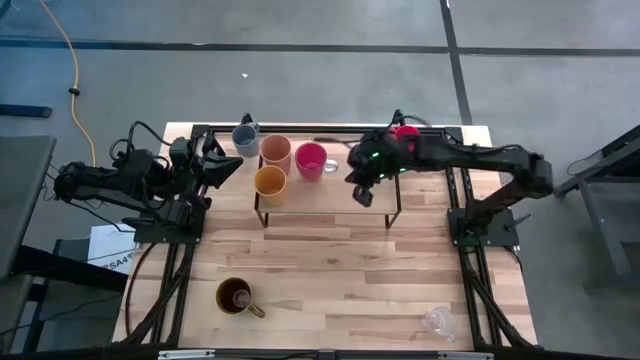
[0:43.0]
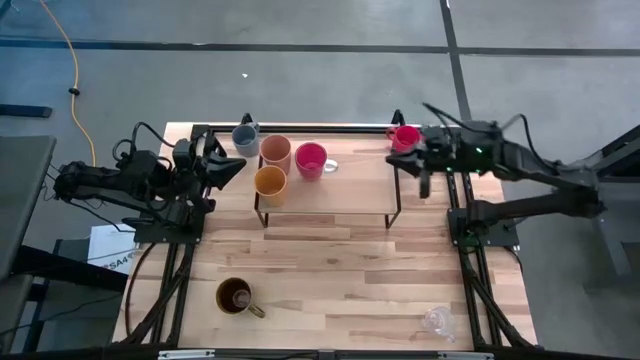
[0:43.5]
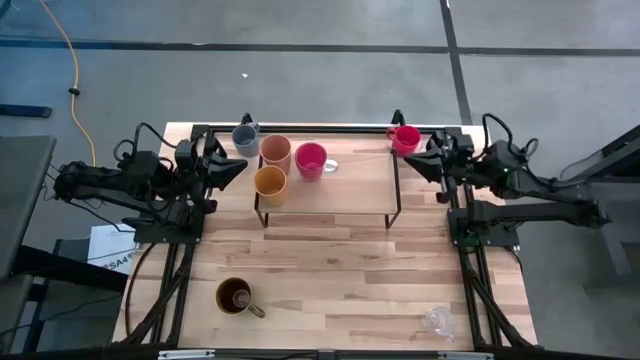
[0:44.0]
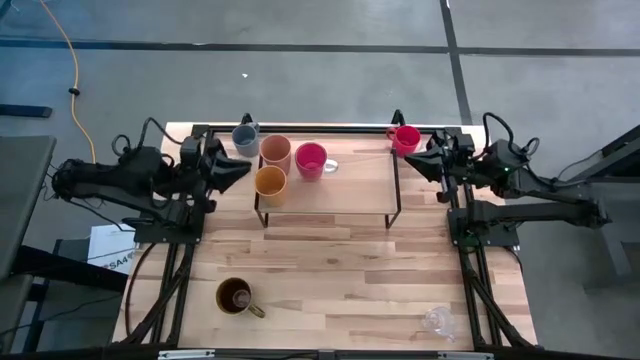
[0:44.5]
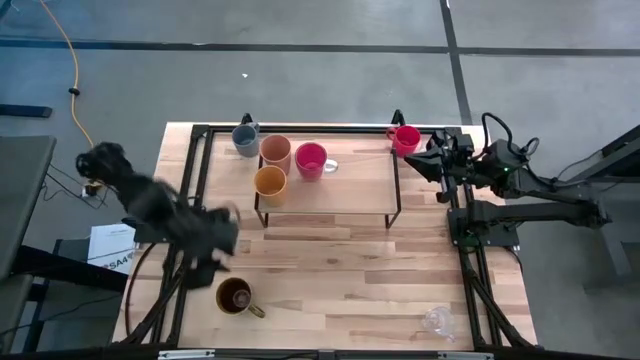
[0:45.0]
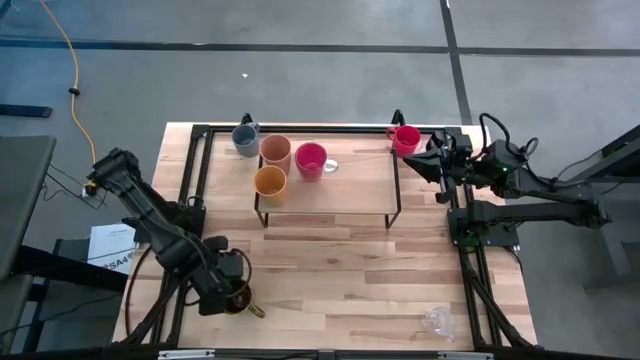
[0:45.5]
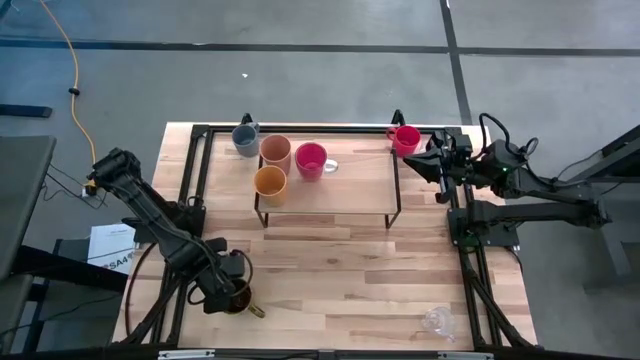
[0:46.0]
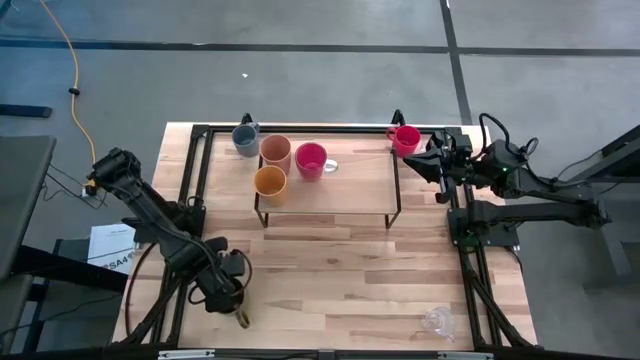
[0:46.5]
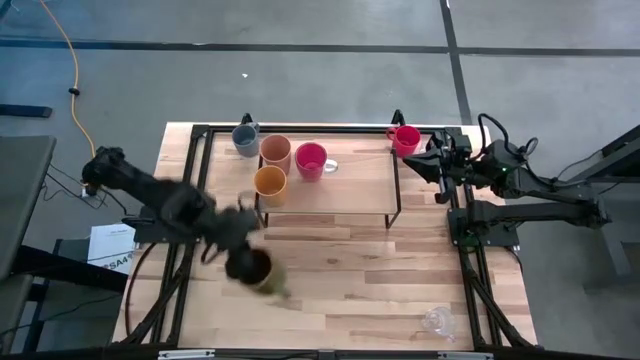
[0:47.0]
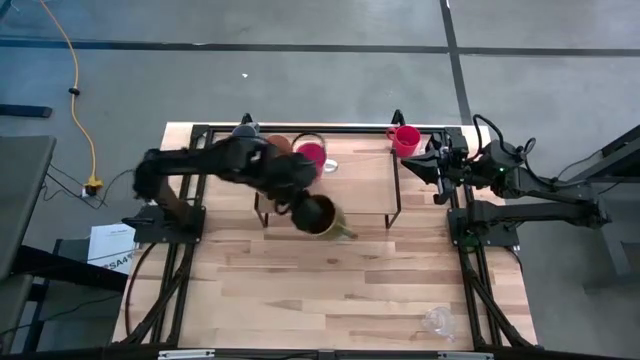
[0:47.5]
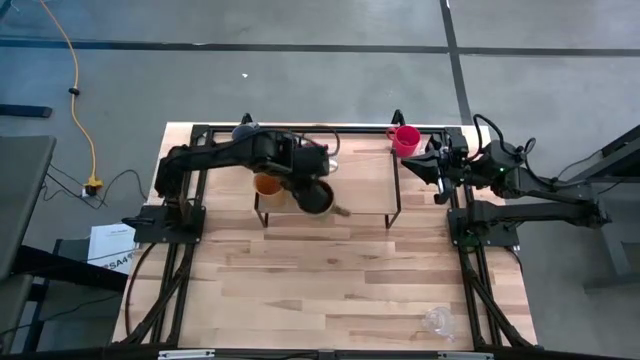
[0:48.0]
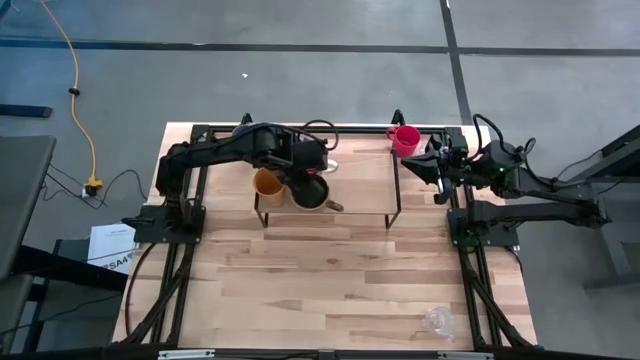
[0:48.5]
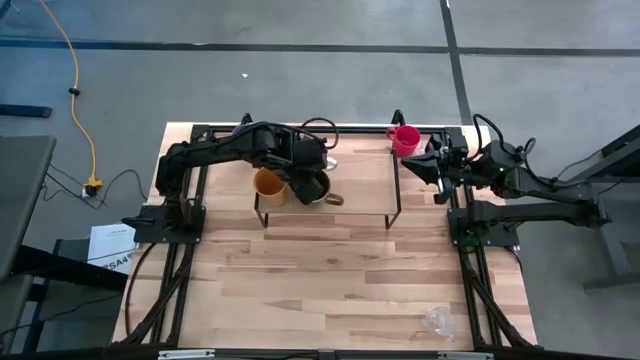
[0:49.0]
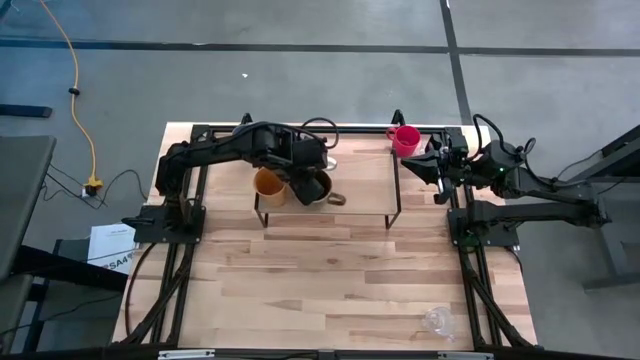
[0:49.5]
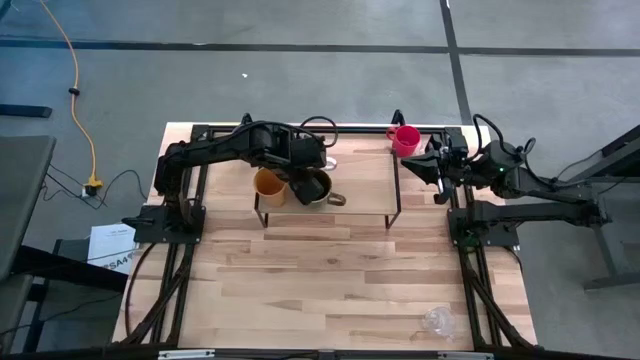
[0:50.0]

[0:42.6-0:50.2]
Task: Stack small to large cups/mugs on shelf
Put the brown mug on the shelf

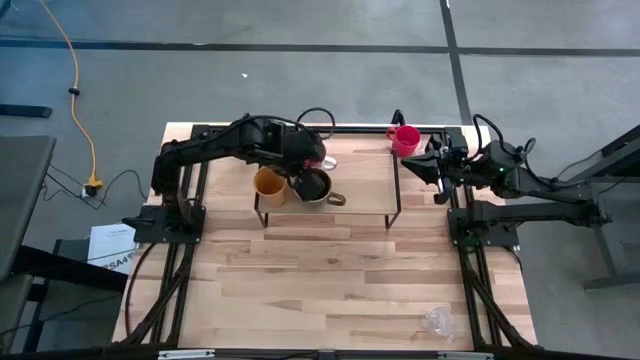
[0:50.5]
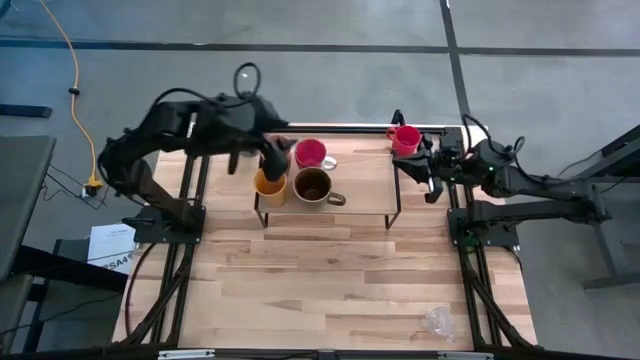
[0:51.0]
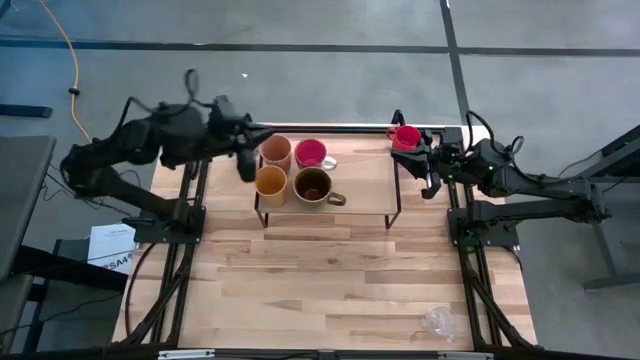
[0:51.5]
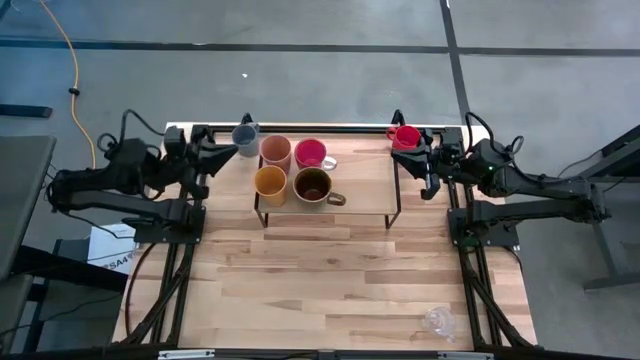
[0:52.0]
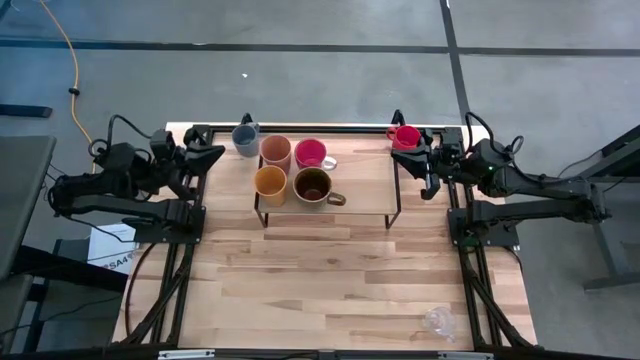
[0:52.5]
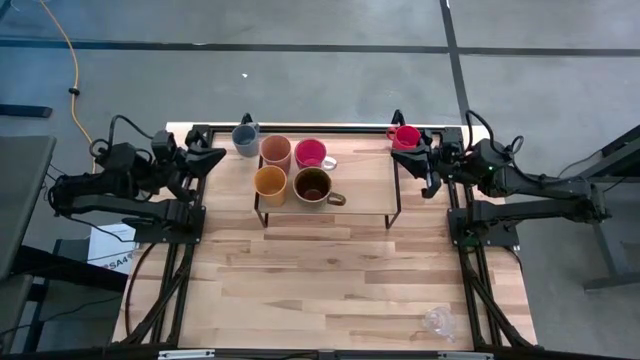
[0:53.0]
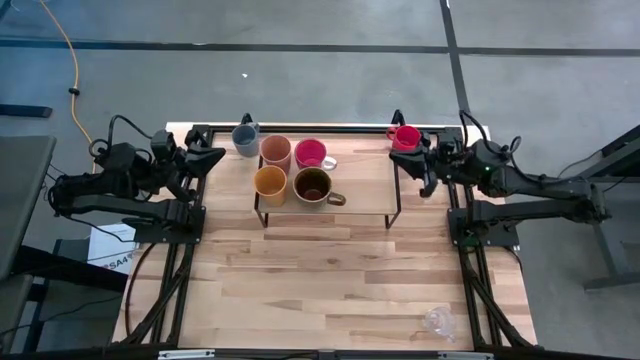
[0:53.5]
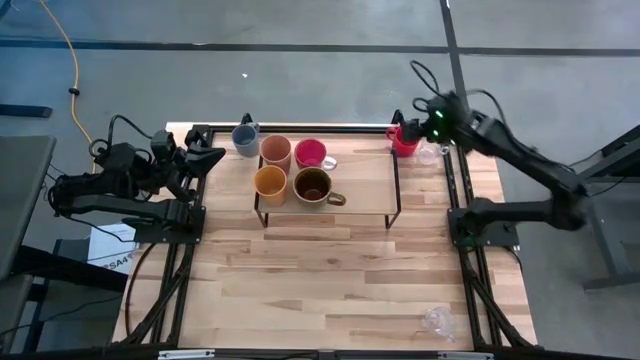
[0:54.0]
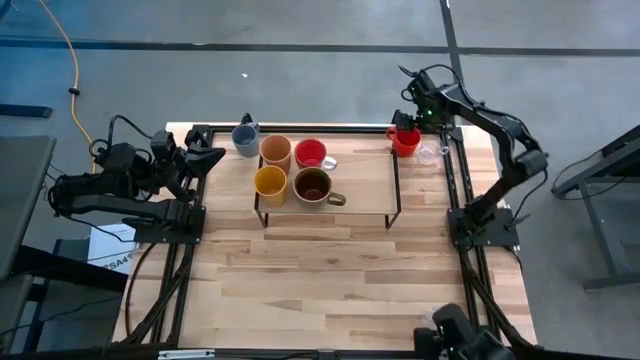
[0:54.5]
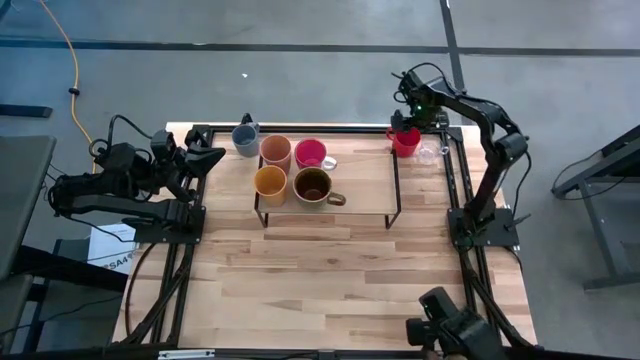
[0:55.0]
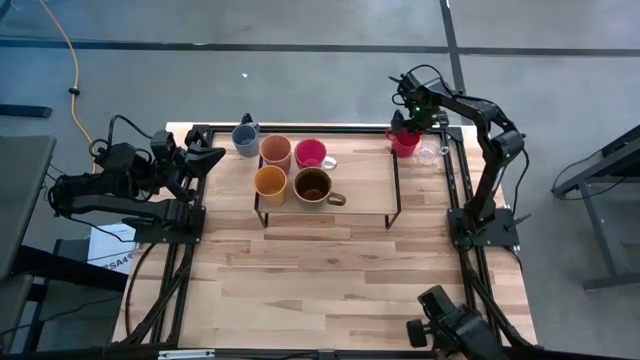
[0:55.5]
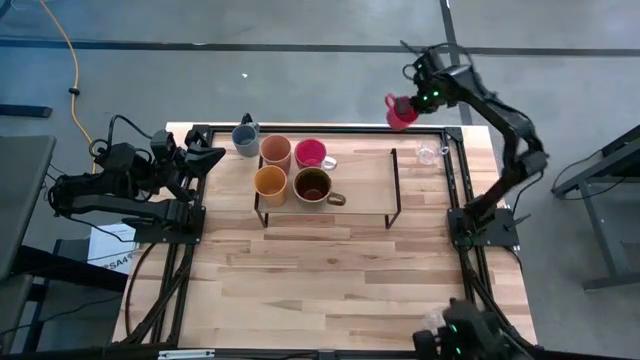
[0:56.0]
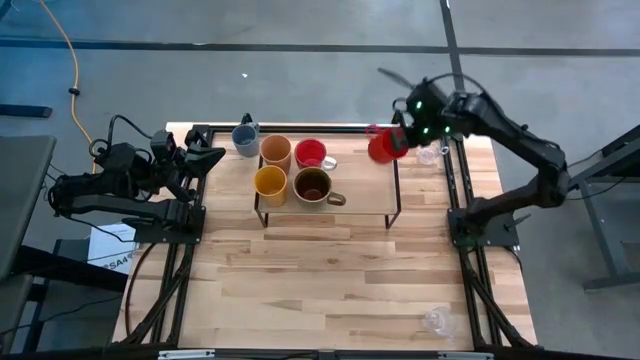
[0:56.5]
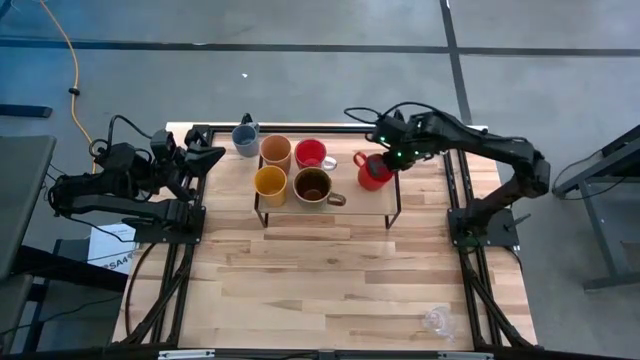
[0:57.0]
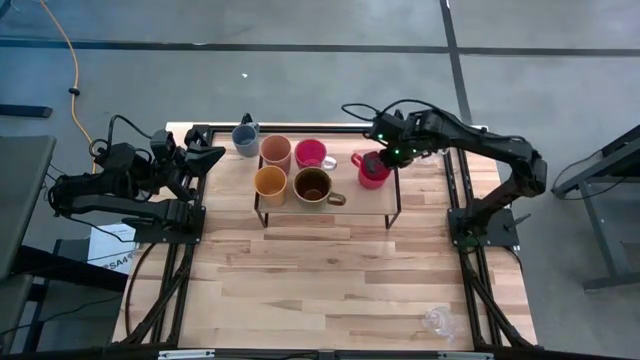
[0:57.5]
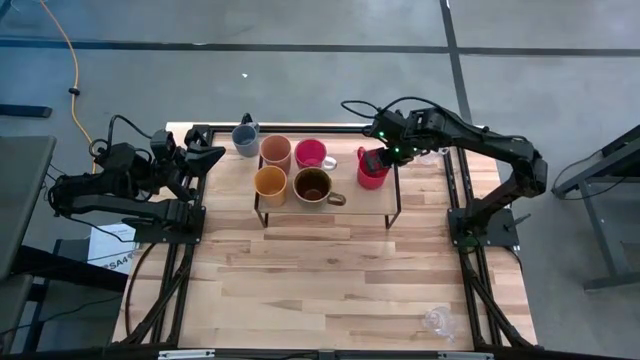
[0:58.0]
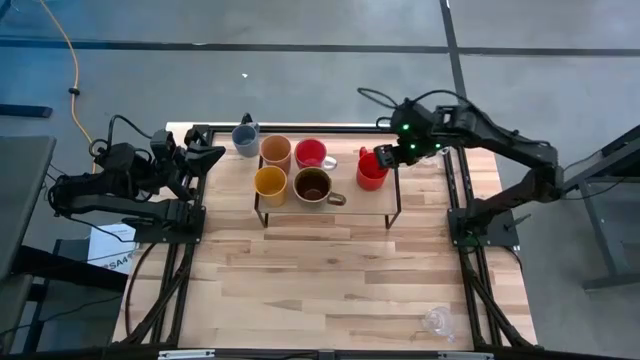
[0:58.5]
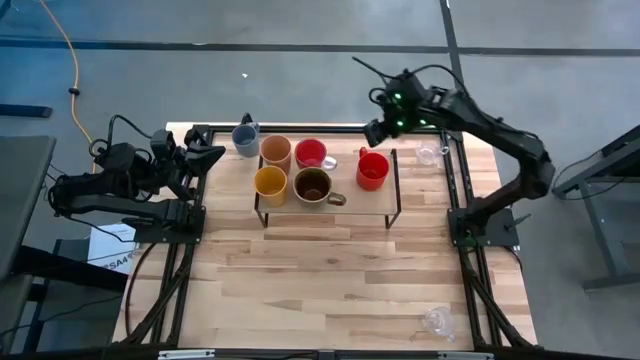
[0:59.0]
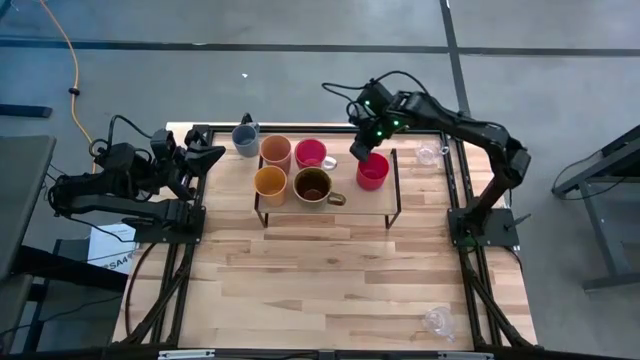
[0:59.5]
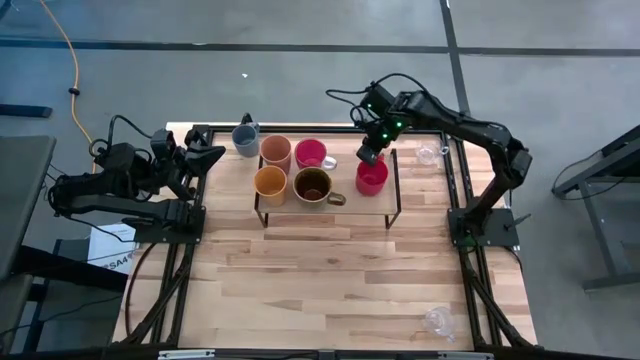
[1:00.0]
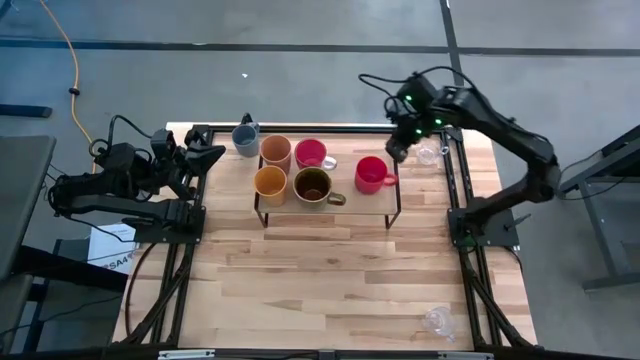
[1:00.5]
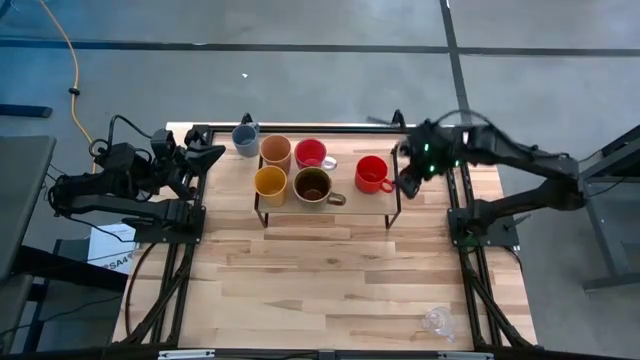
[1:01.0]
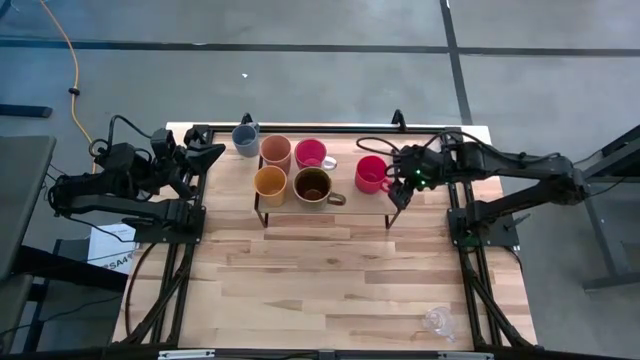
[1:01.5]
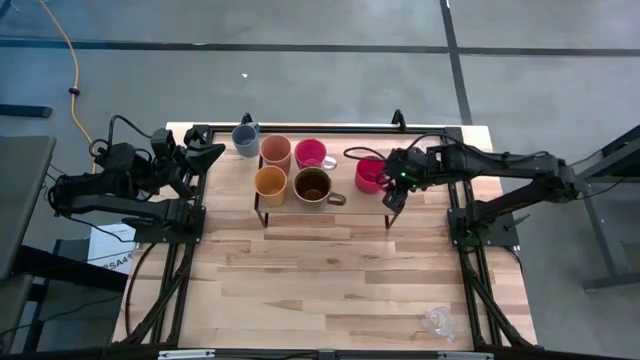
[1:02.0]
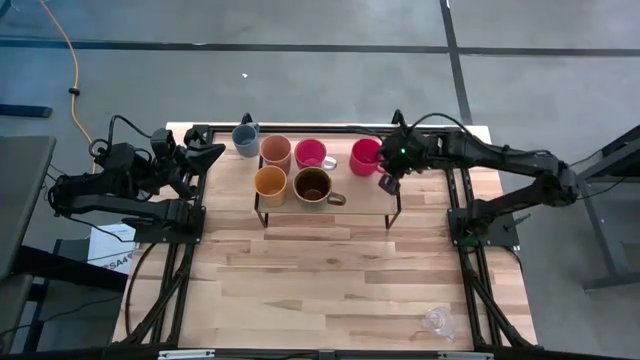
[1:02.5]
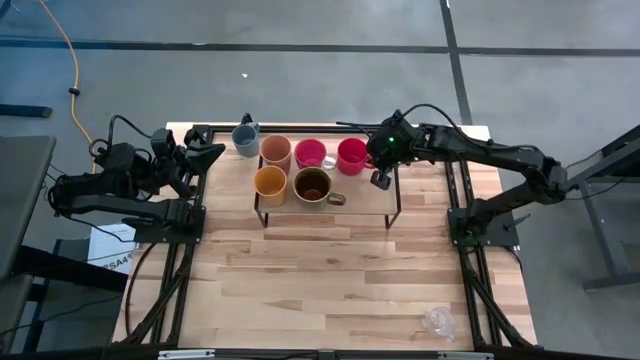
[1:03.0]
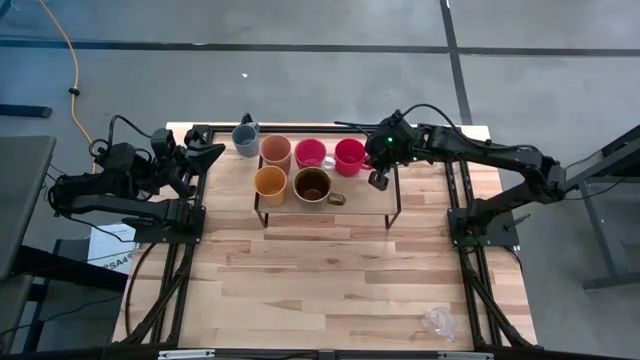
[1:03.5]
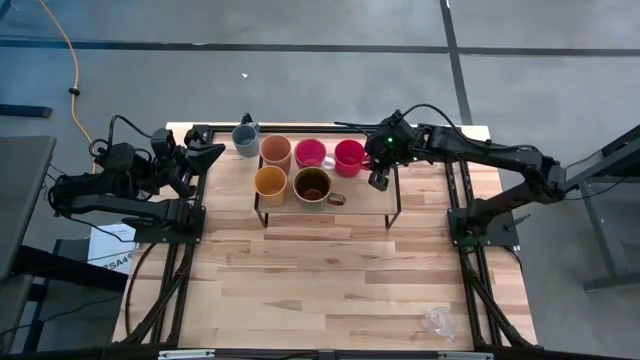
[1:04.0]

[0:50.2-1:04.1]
Put the red mug on the shelf
